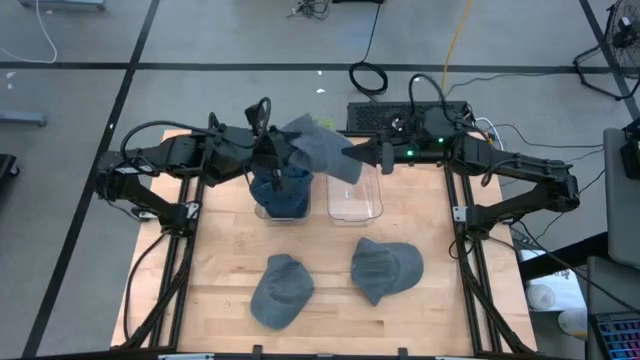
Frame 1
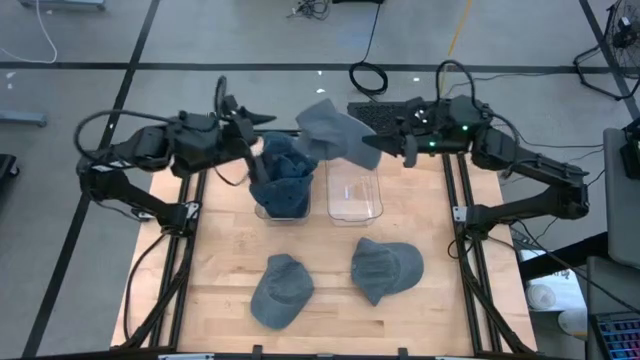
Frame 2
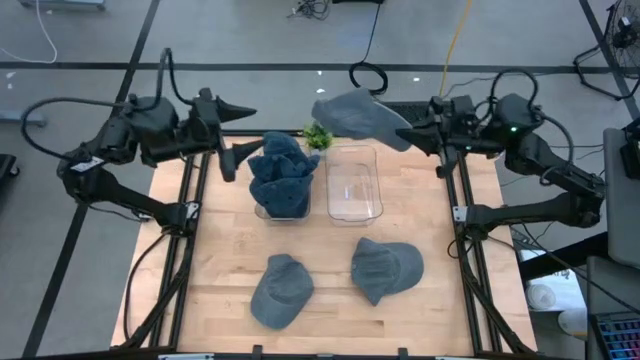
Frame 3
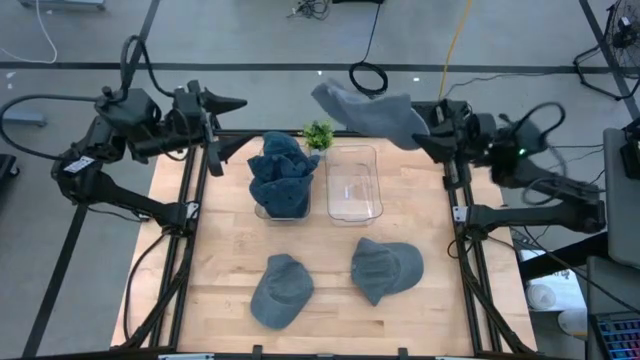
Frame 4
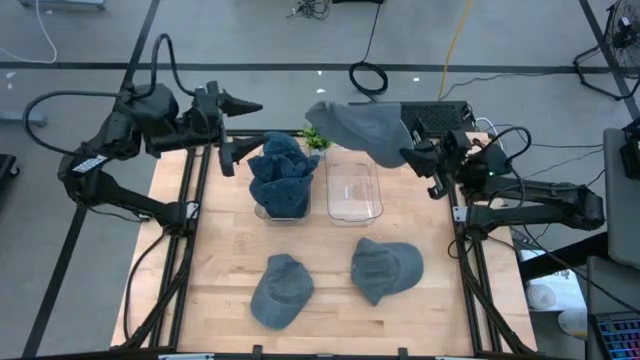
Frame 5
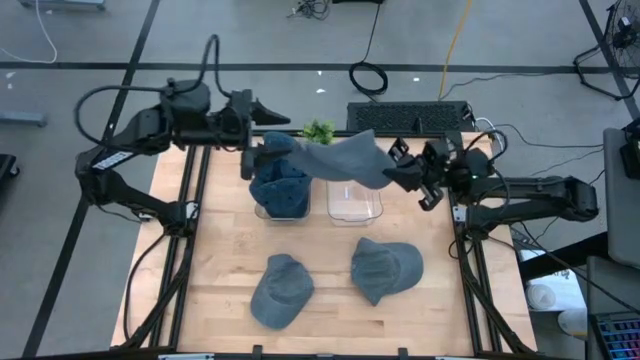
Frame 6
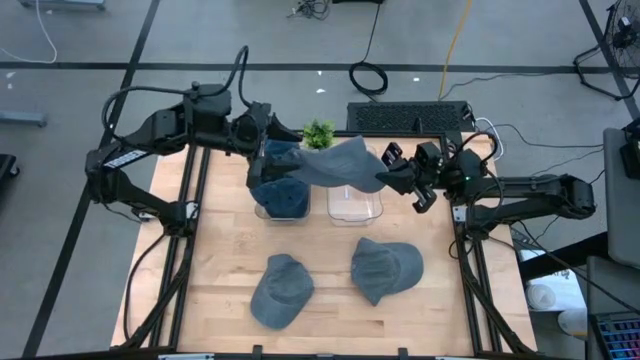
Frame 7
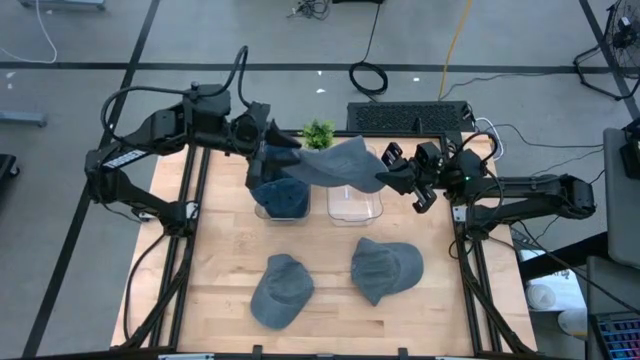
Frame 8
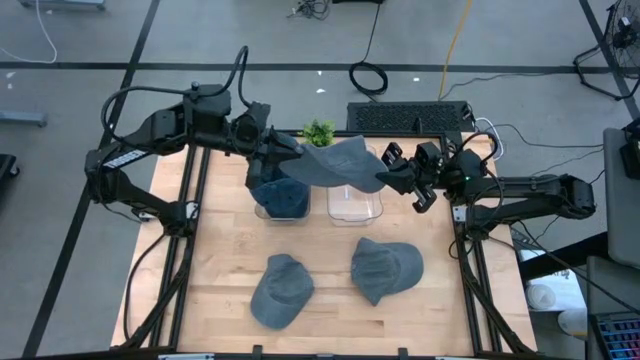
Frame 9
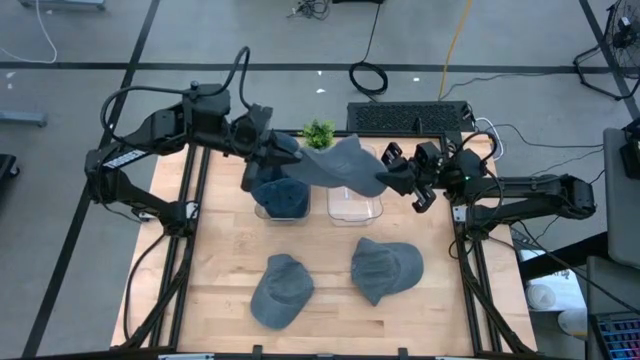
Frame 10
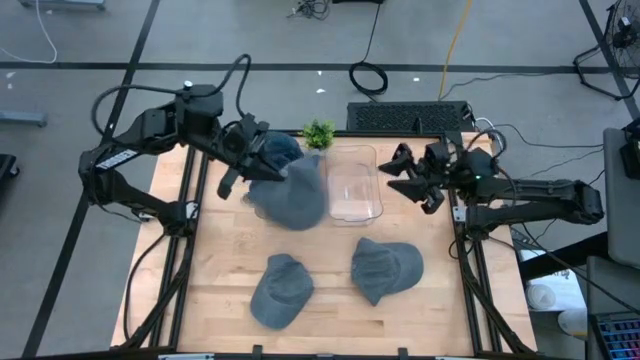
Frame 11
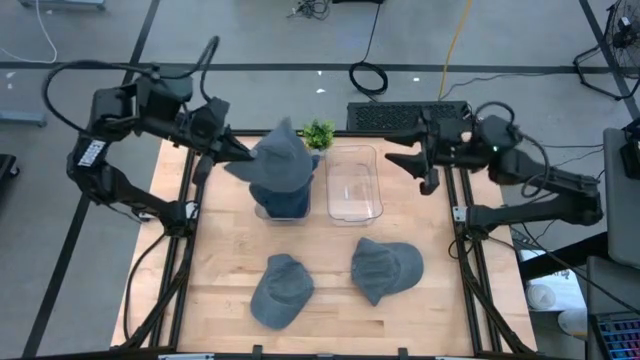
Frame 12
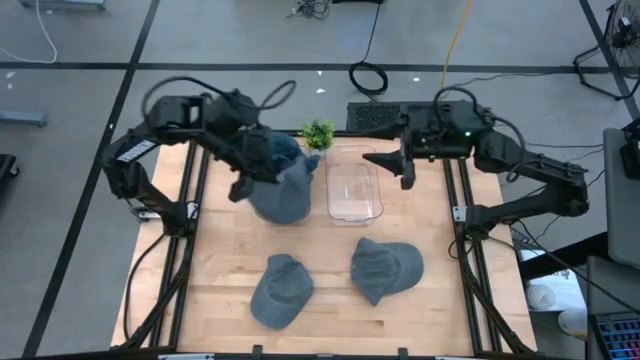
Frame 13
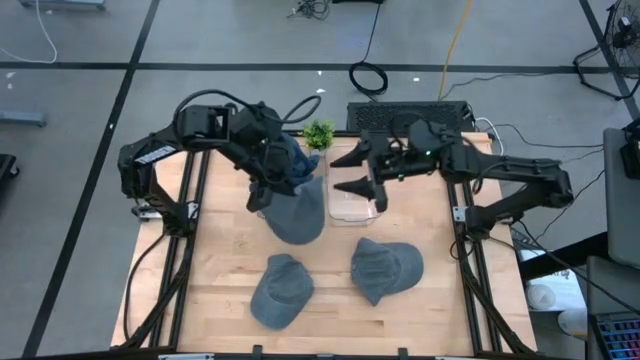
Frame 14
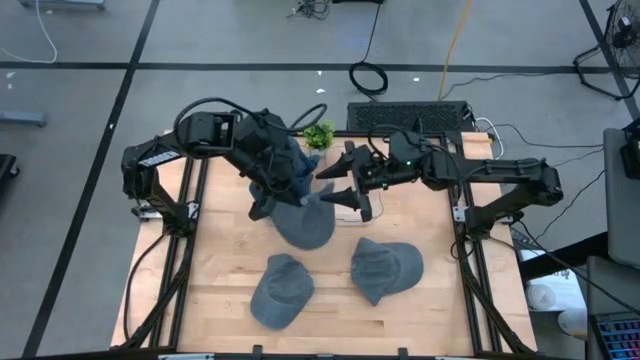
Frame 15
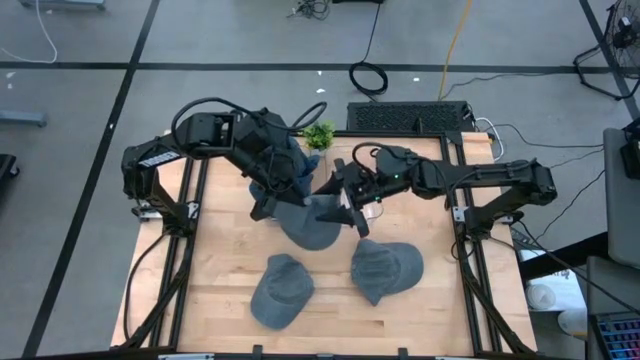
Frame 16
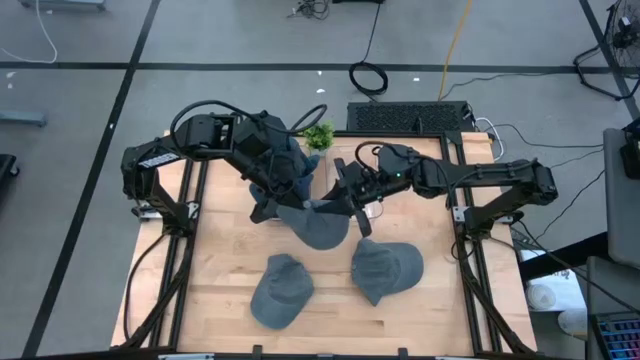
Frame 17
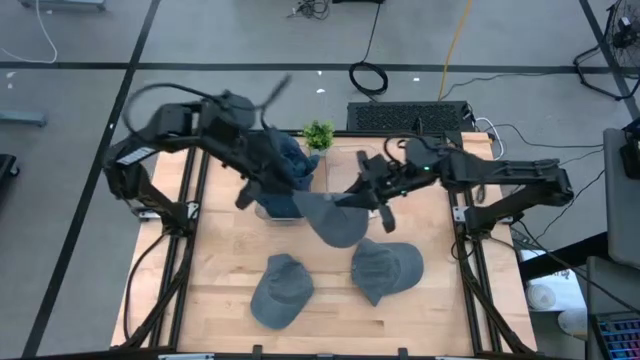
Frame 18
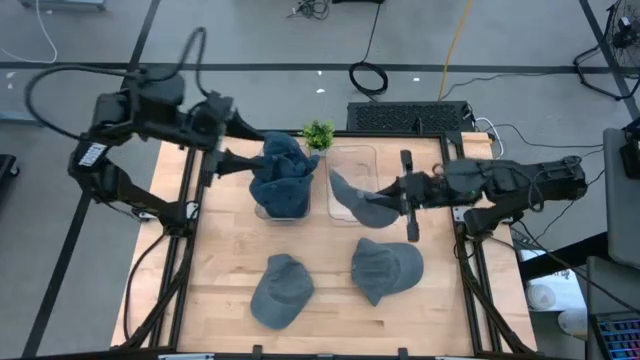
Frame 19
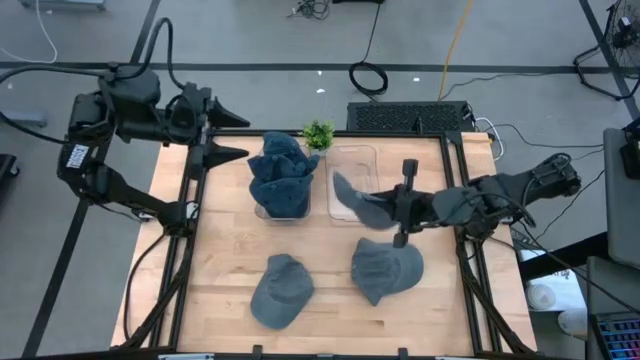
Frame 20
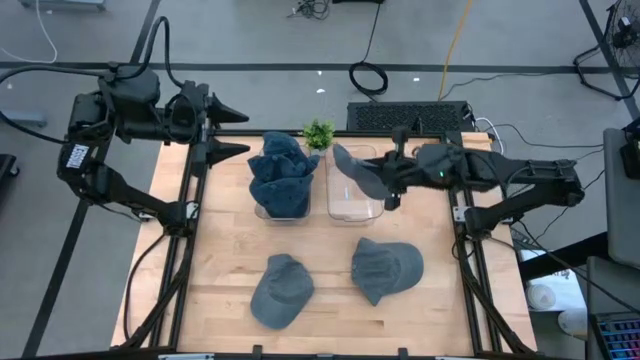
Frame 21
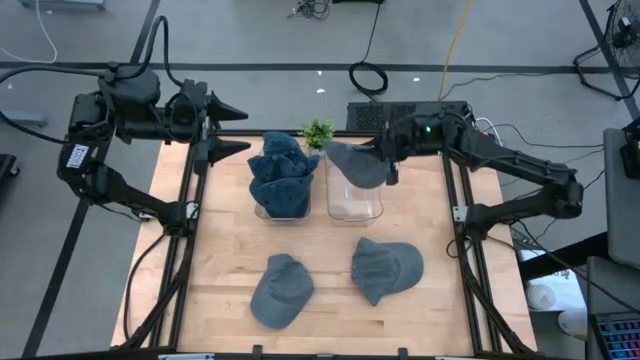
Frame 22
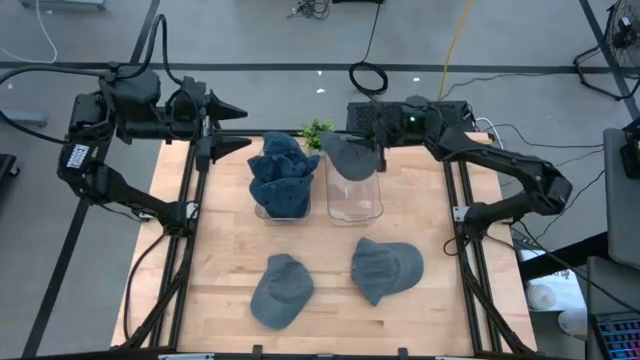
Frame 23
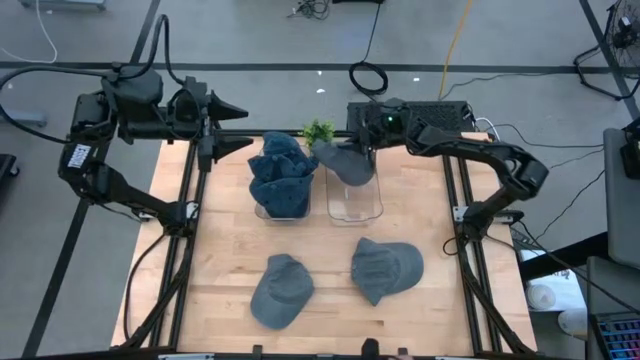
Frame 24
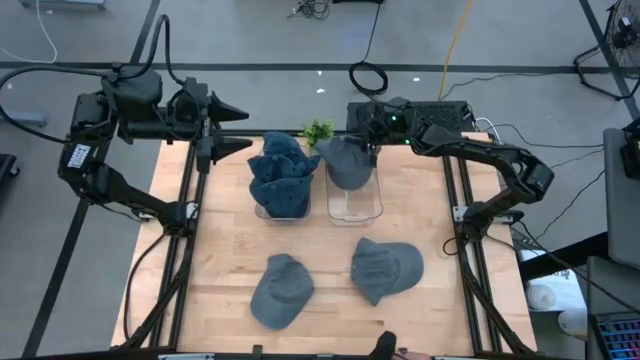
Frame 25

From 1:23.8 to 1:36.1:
Task: Pick & Place hat
Put the top gray cap into the right transparent bin

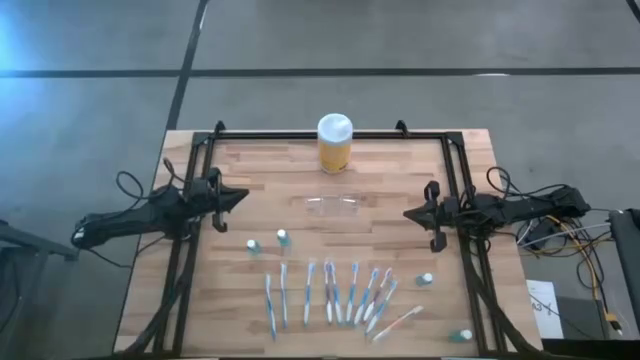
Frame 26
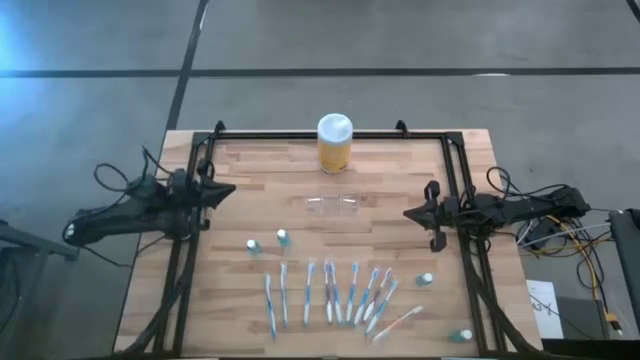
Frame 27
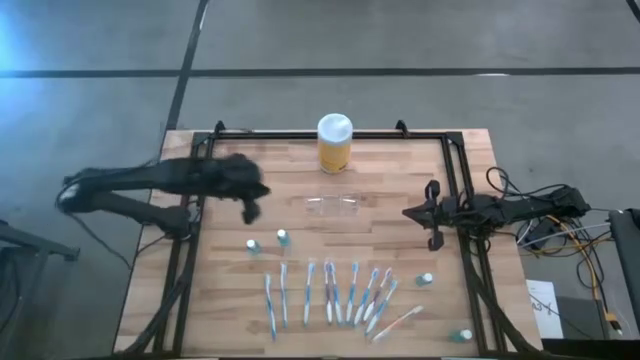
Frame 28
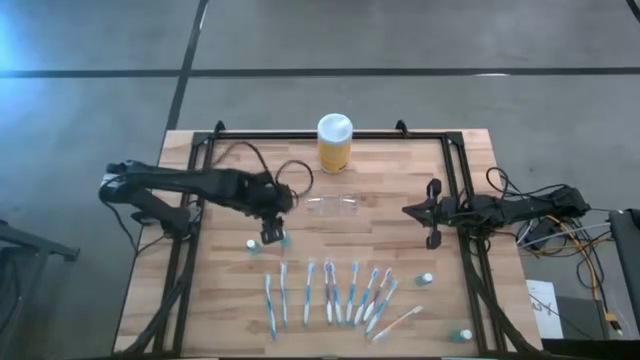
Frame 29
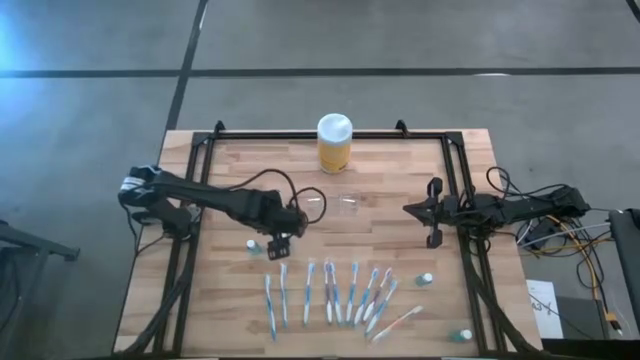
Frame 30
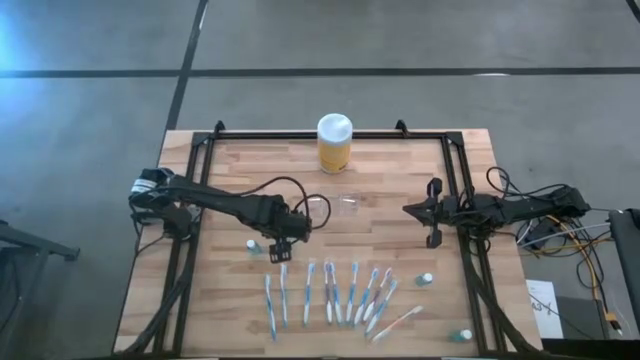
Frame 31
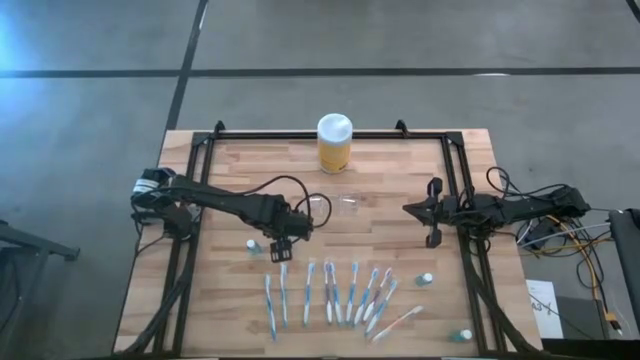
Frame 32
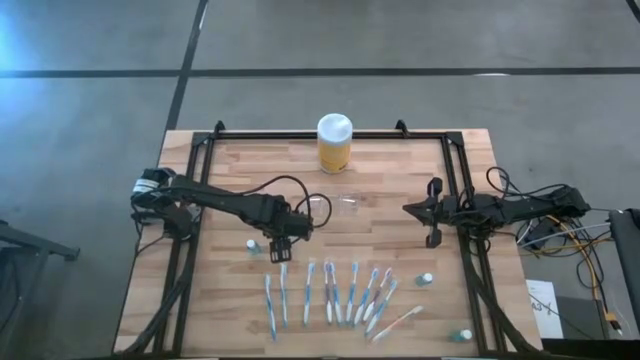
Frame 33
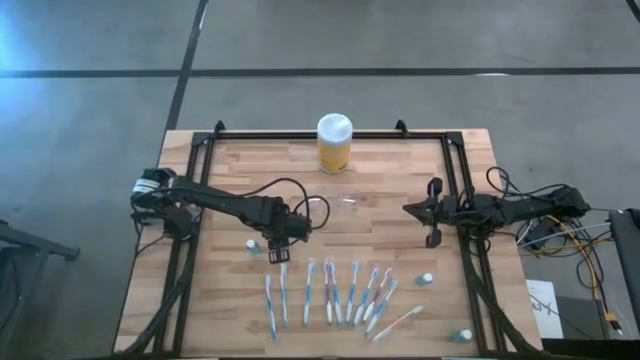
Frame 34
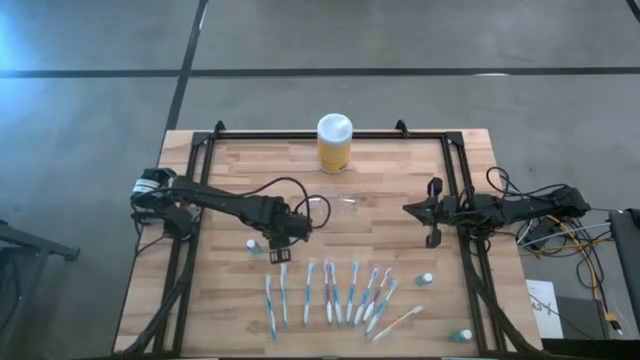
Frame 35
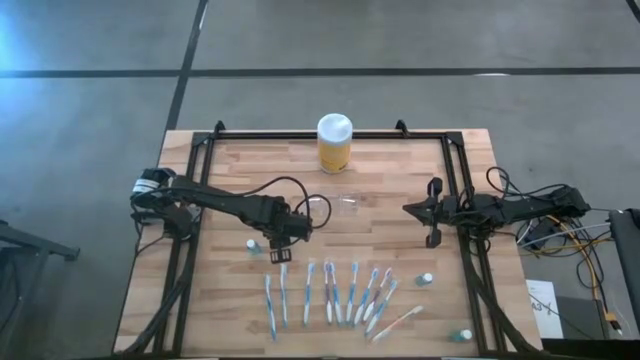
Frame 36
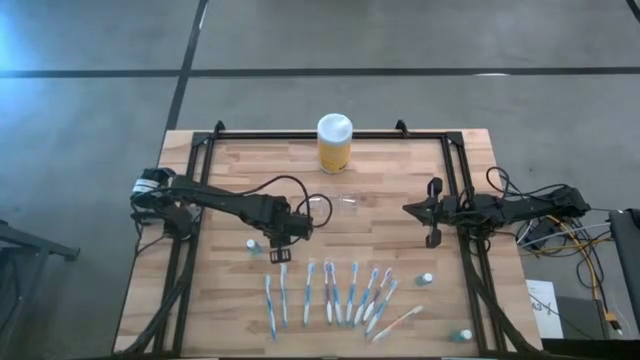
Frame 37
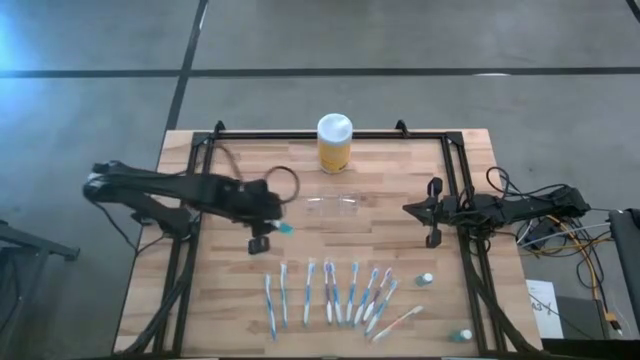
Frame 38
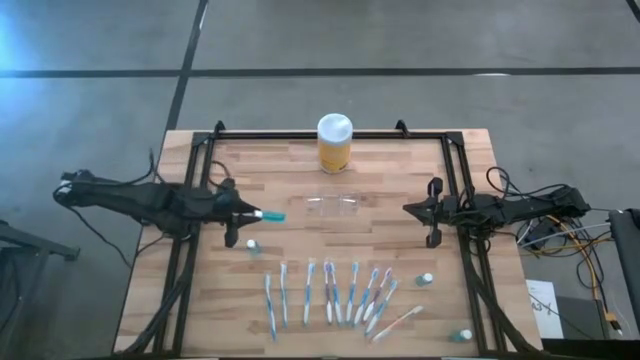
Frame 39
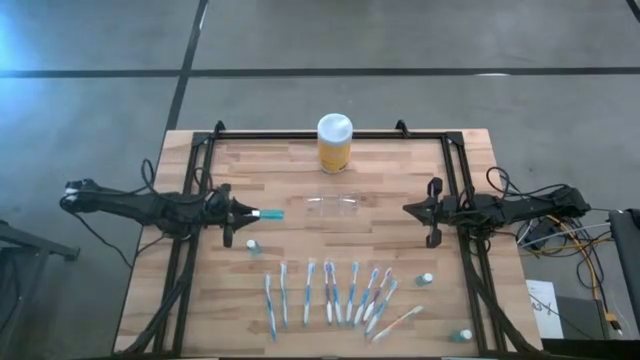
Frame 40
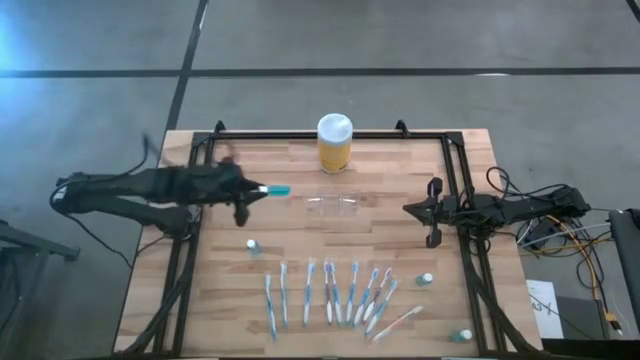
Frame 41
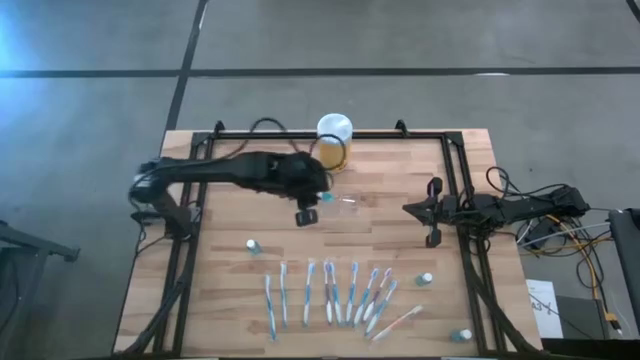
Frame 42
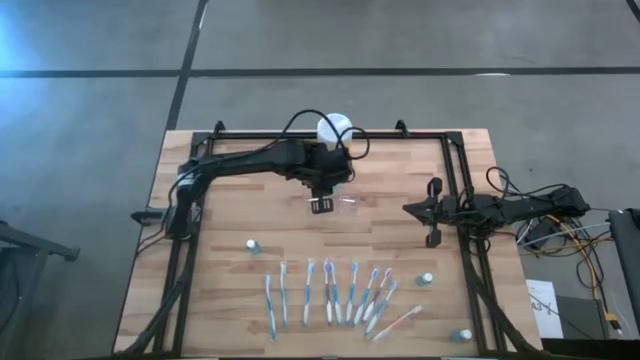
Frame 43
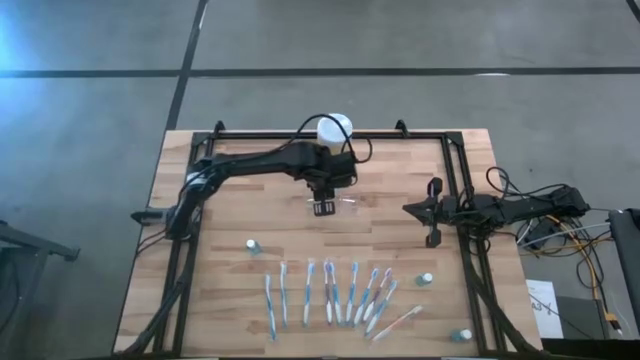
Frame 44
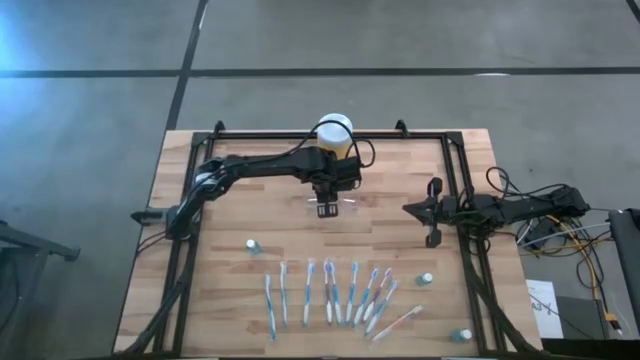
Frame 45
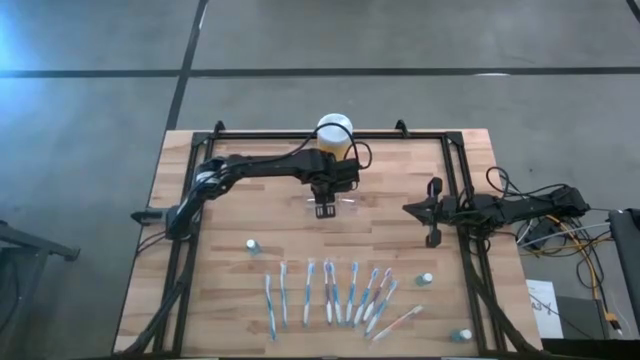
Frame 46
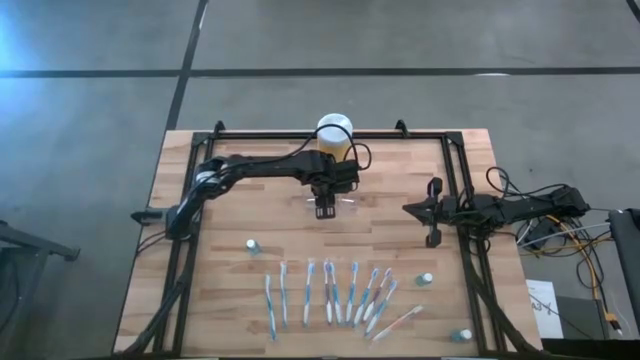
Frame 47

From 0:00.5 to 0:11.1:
Task: Pick & Place toothbrushing station
Put the blue mouthwash into the middle of the transparent organizer
